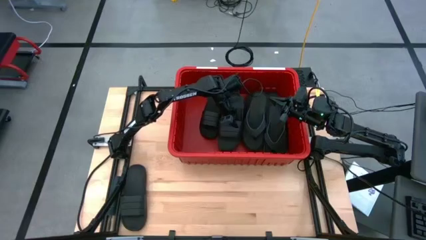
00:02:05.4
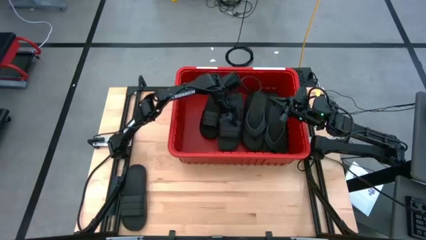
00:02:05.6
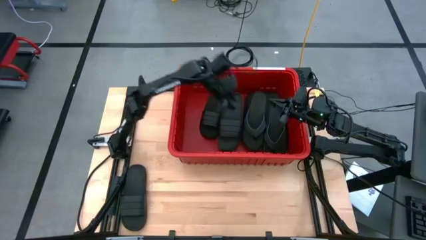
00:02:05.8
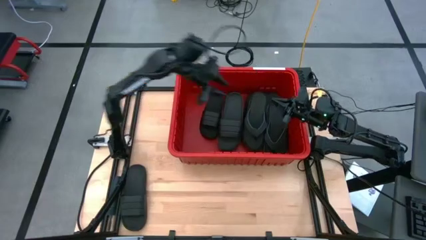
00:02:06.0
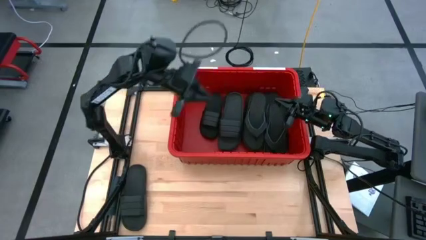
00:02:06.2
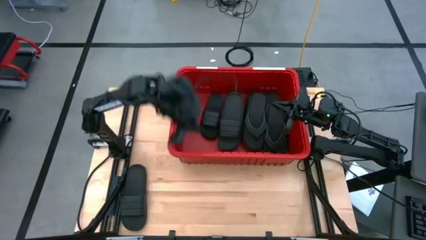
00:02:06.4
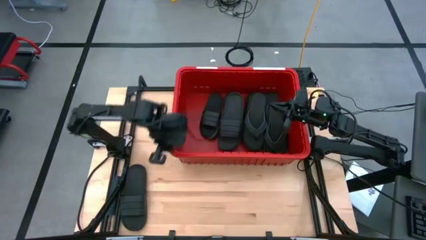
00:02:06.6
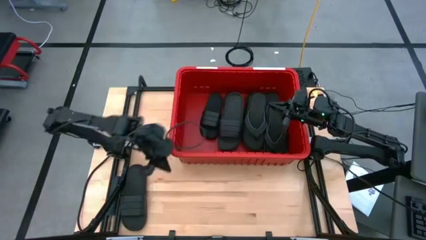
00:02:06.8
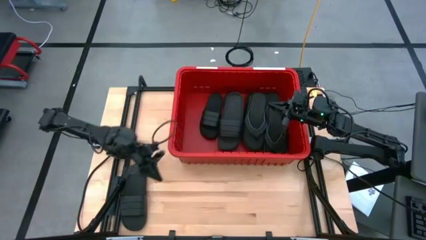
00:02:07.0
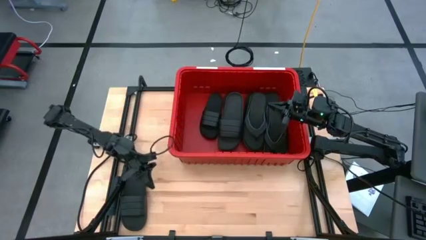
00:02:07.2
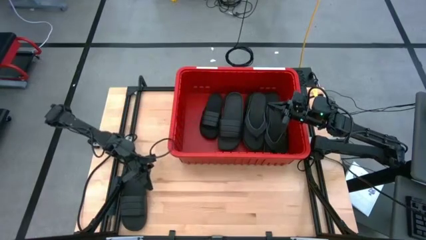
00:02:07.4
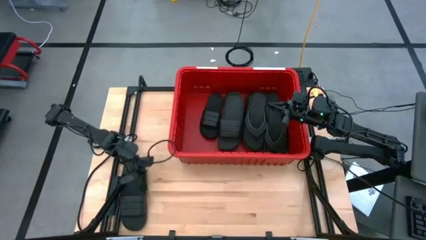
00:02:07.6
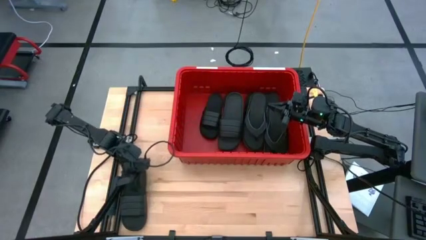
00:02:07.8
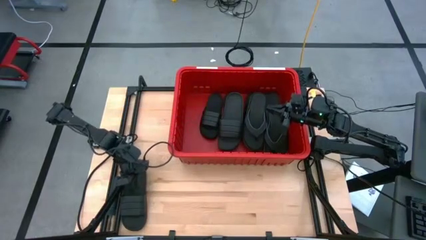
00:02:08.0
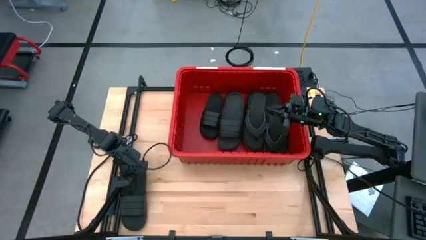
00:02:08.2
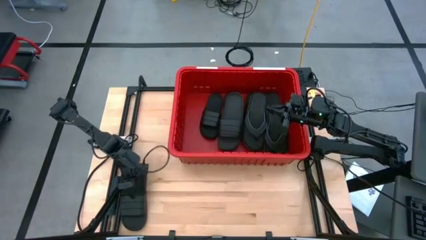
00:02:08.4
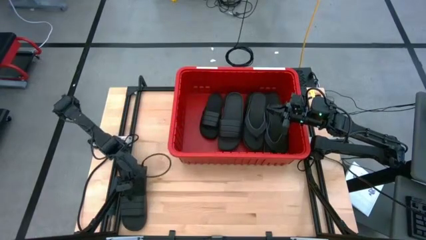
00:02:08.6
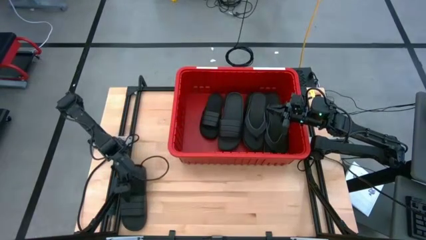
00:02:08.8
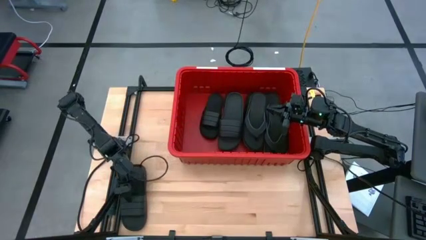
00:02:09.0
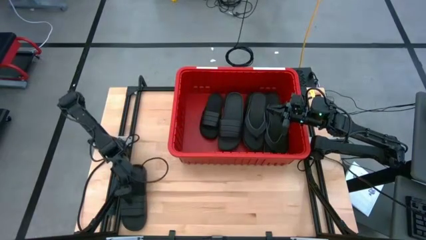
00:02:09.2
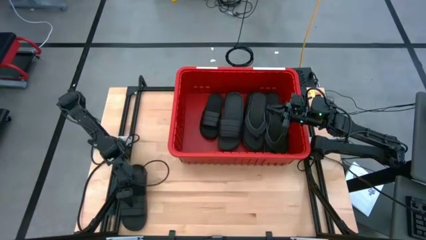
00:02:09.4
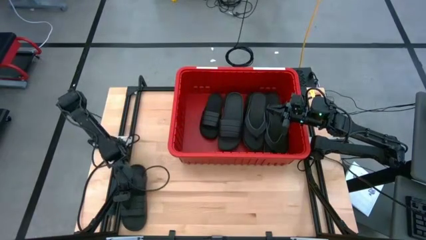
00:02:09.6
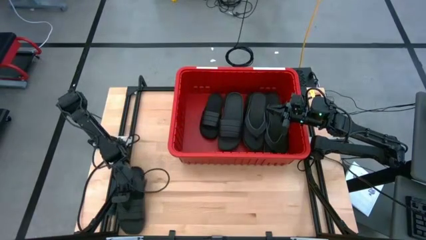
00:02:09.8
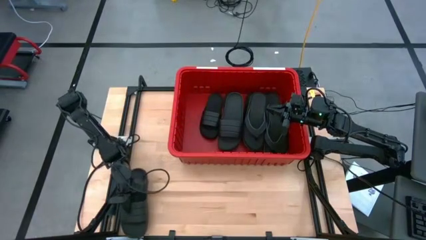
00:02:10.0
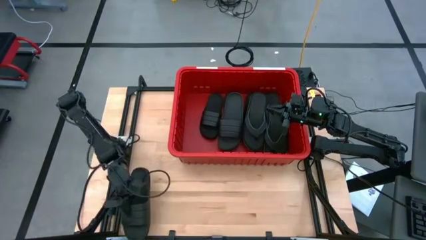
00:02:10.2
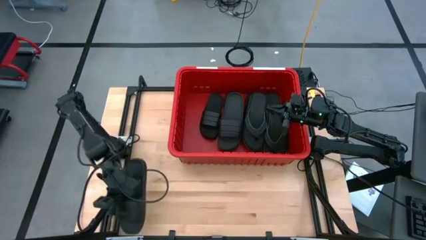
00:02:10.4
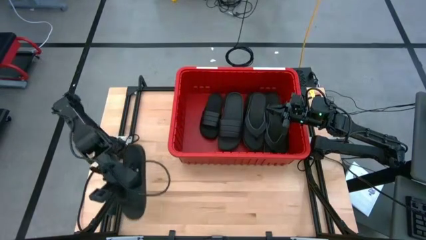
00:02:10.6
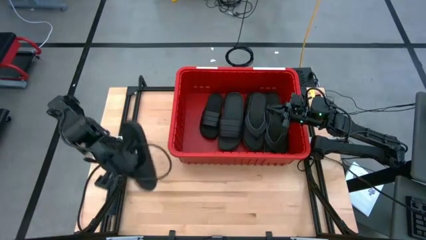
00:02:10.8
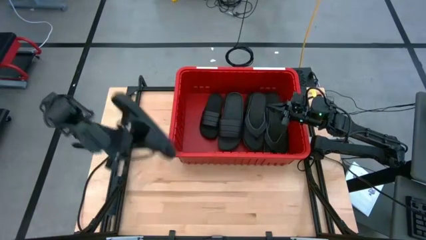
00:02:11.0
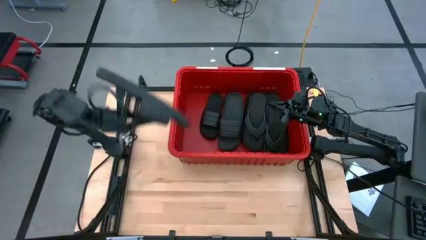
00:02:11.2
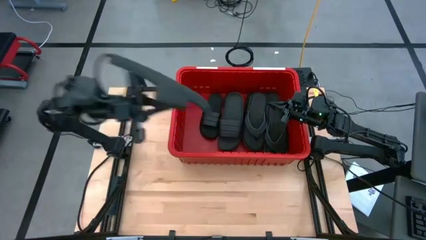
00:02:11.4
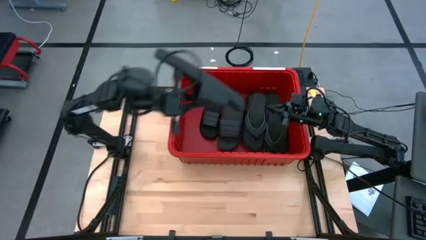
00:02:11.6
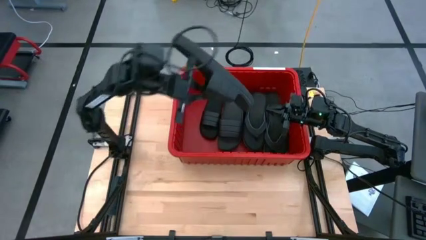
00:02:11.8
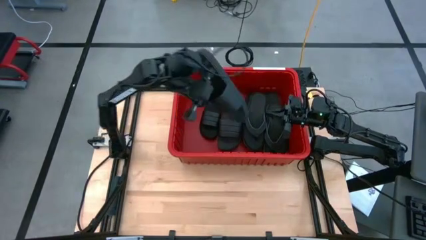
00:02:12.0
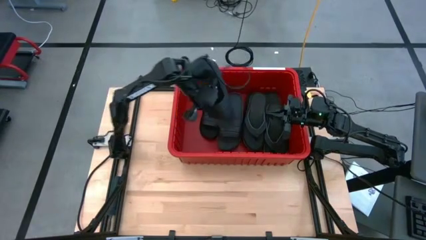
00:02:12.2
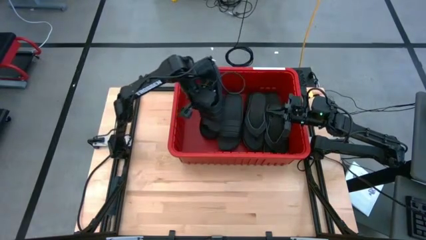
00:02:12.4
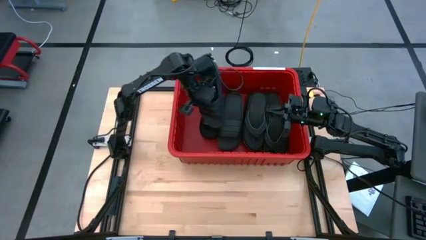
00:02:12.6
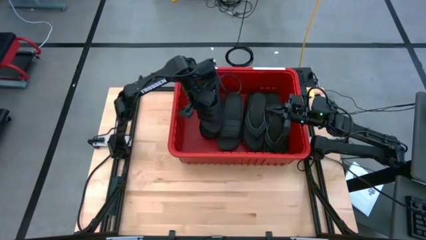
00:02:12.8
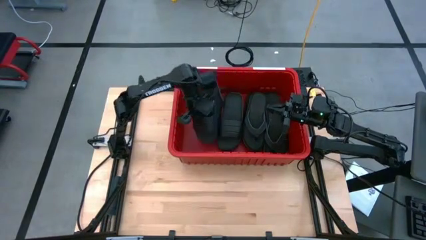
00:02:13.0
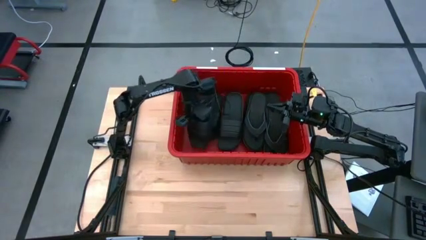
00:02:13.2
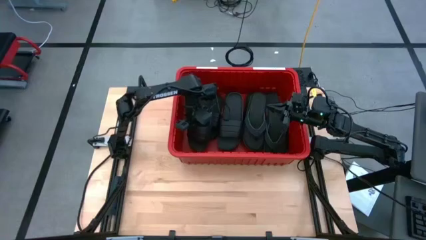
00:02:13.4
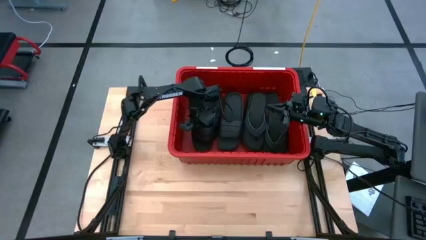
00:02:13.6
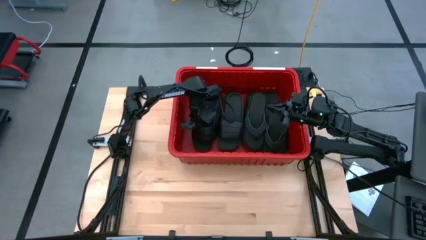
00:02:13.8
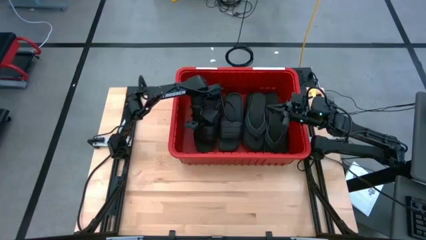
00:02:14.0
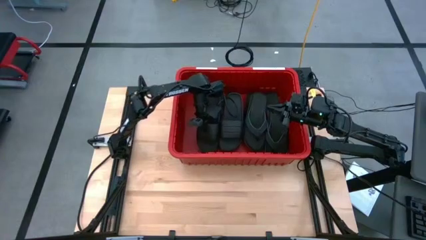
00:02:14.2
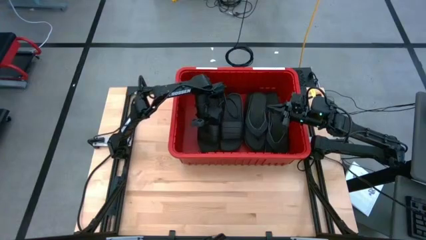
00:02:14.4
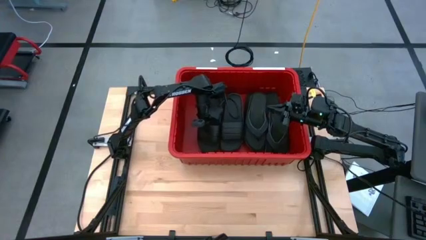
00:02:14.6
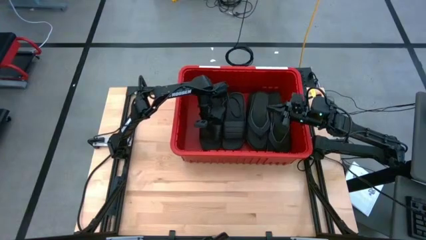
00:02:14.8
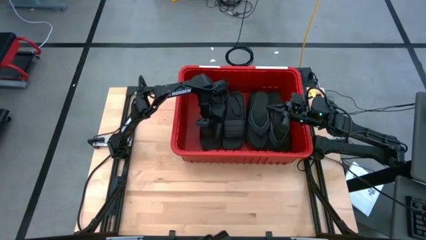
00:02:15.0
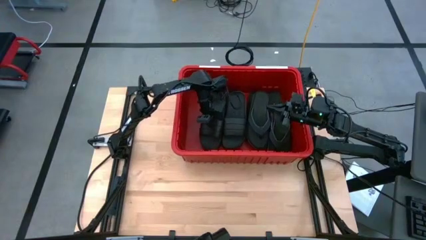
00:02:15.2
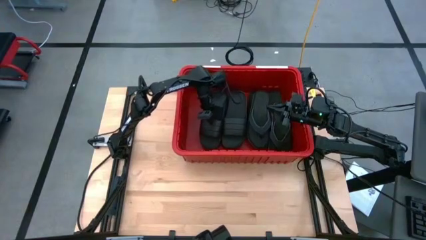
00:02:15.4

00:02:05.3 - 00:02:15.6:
Task: Pick and place slides into bin
Put the slide into the bin

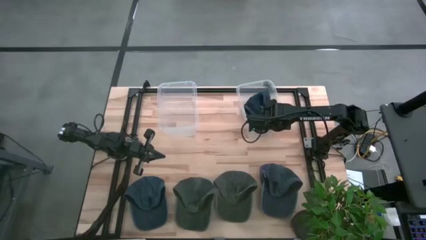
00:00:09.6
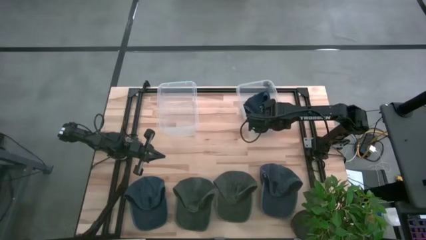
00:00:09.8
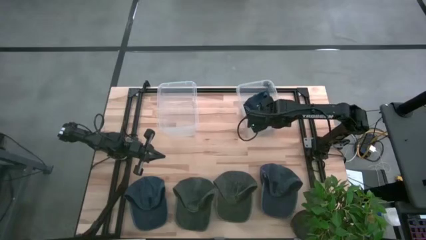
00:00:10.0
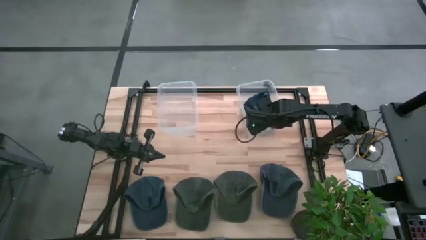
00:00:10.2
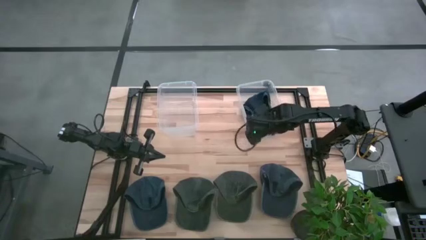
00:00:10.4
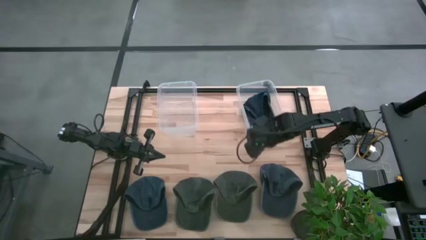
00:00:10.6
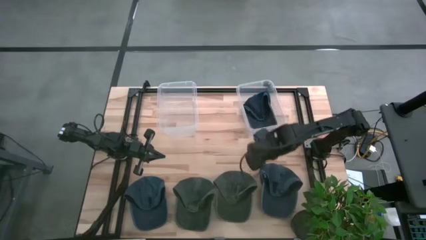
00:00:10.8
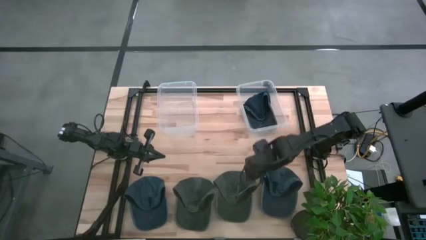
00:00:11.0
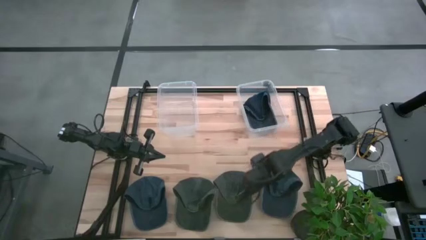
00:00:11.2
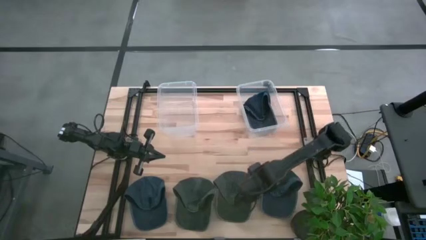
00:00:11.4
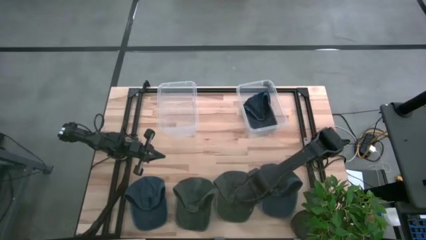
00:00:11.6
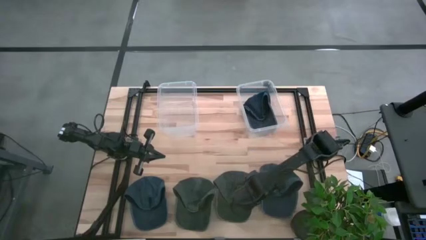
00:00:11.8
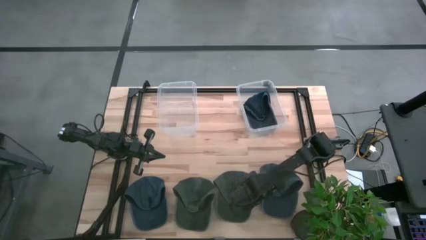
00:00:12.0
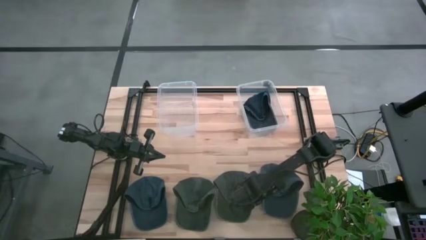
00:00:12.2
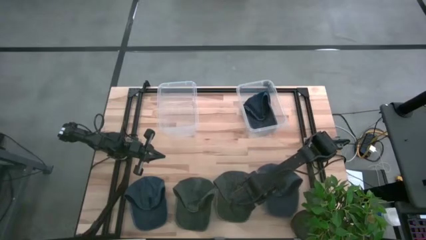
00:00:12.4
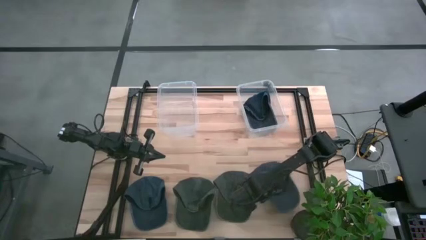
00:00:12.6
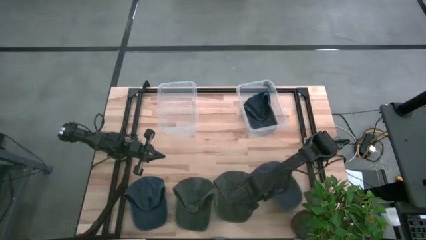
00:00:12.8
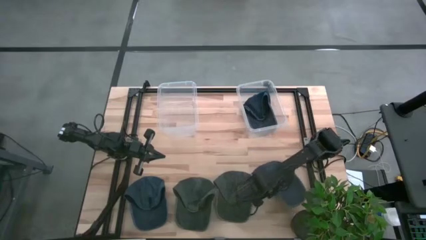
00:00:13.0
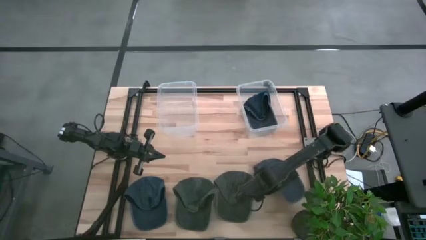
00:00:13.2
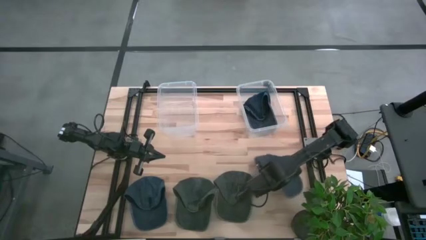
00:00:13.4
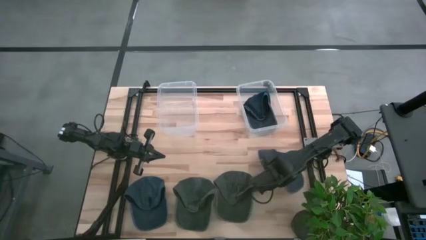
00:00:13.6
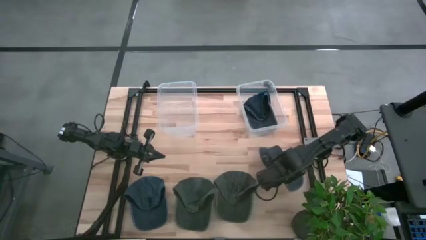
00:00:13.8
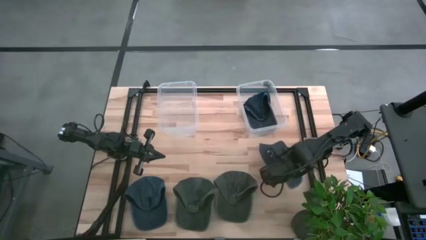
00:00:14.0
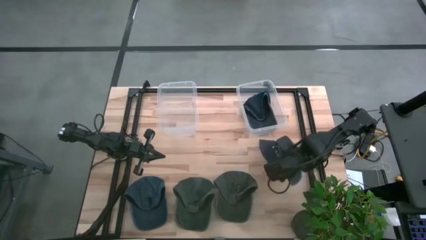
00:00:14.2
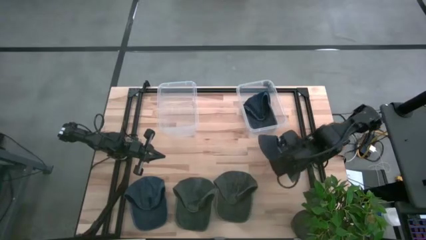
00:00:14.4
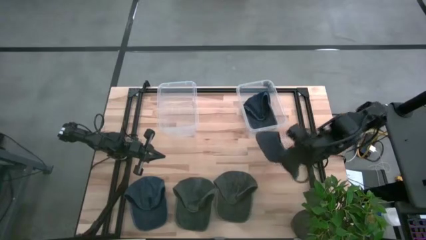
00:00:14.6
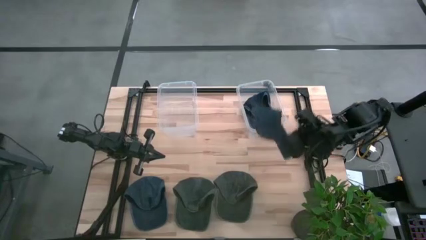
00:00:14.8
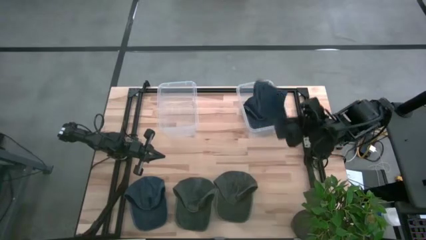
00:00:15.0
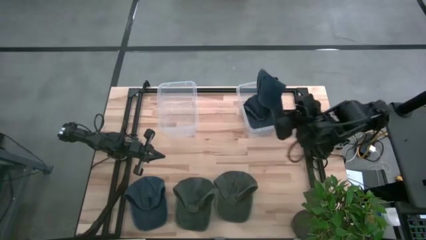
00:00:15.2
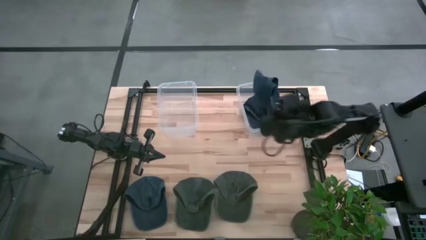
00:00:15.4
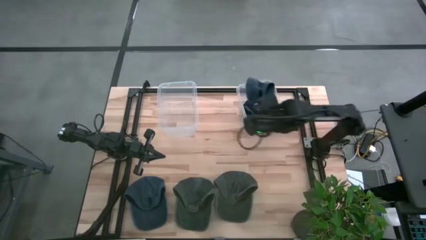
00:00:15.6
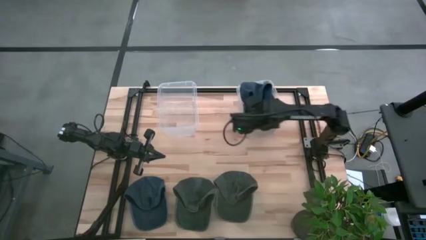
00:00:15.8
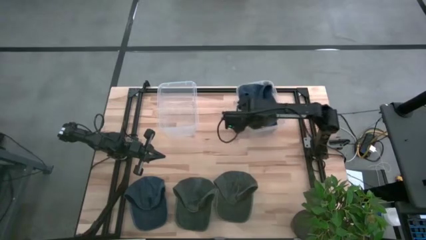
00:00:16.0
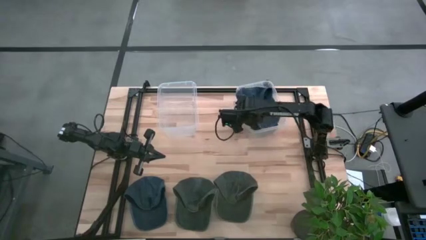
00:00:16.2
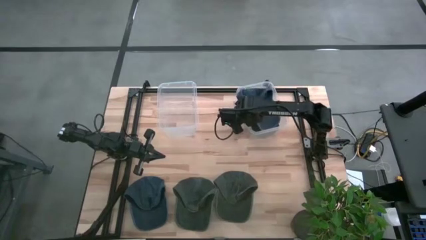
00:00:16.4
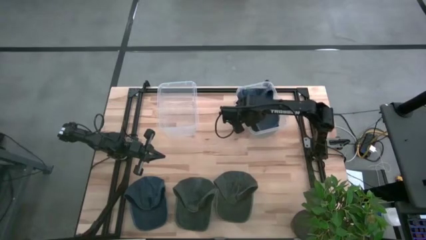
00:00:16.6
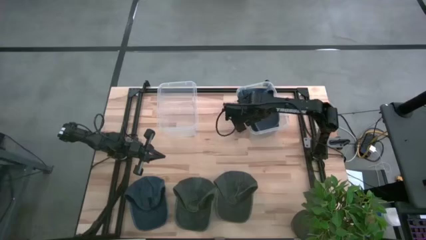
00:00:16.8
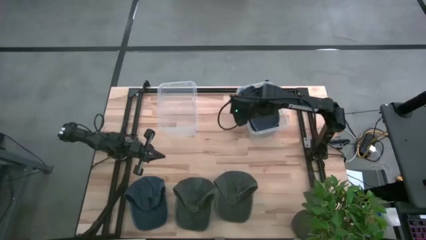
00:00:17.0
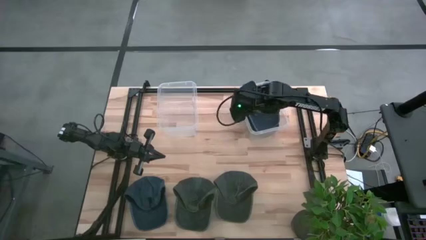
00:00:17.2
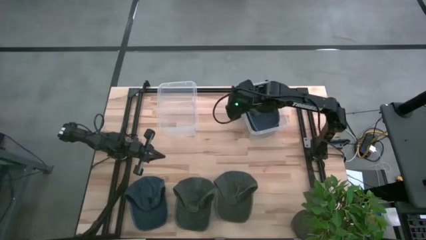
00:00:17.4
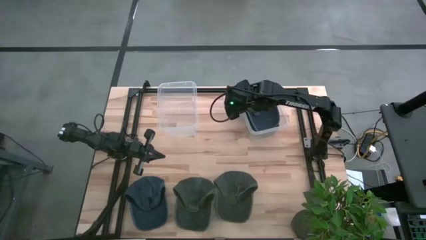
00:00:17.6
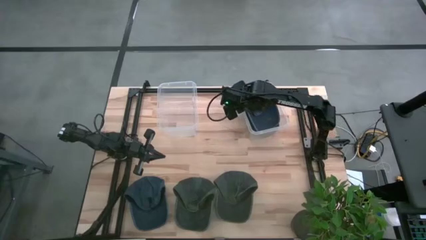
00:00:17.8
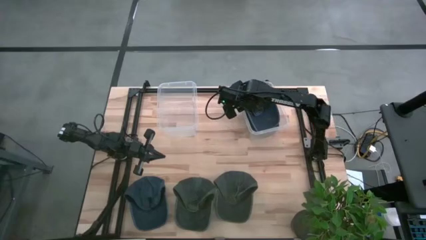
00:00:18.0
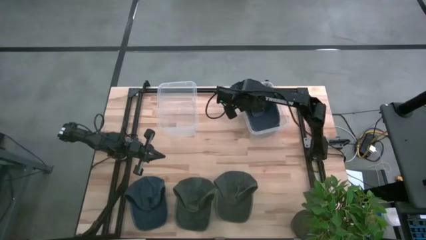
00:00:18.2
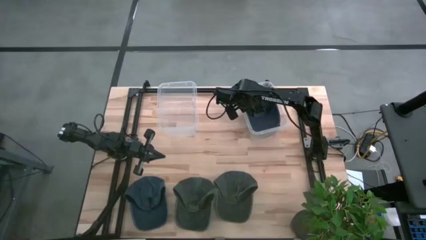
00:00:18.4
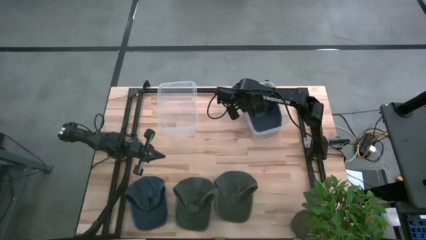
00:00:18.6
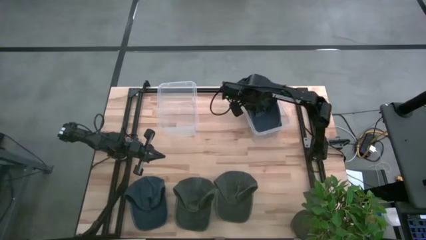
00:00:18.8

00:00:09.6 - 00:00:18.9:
Task: Pick & Place hat
Put the right blue cap into the right transparent bin
